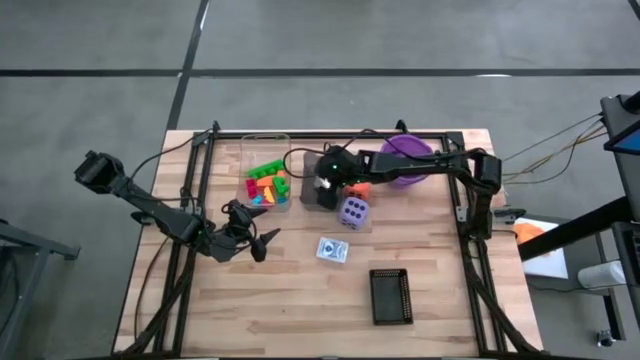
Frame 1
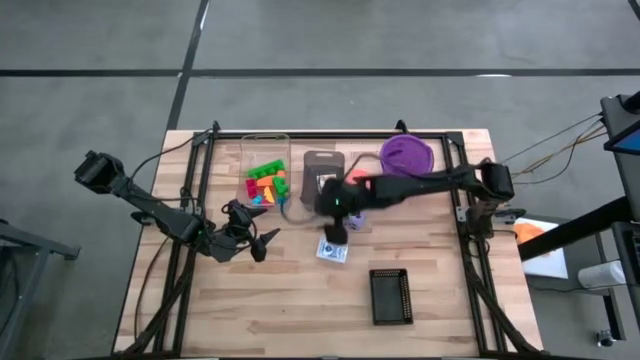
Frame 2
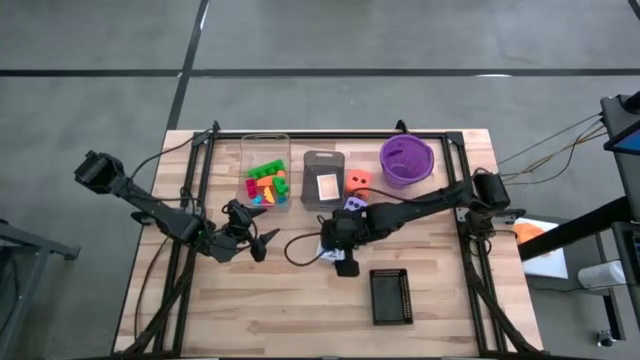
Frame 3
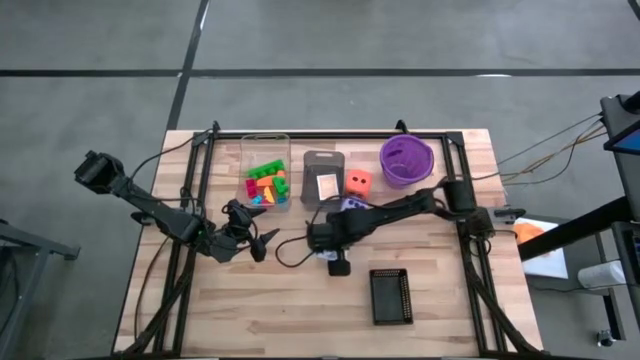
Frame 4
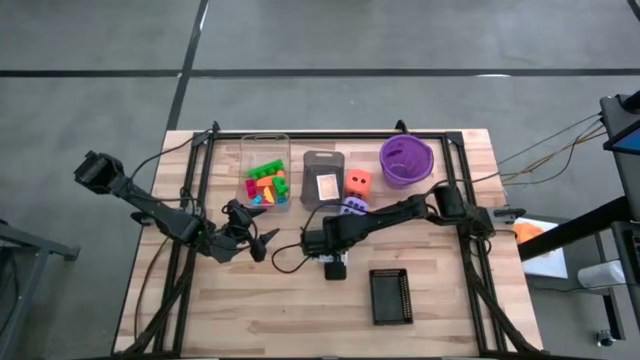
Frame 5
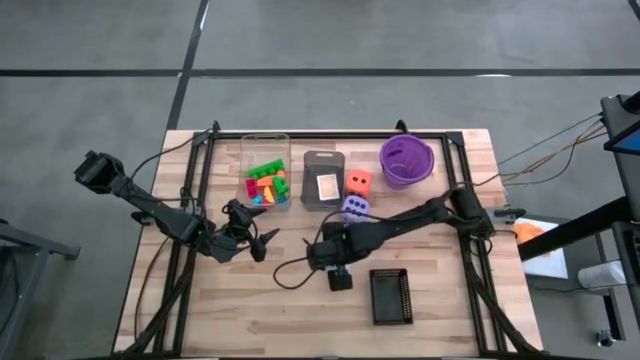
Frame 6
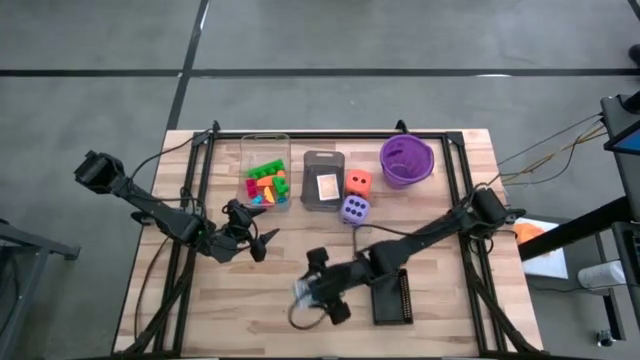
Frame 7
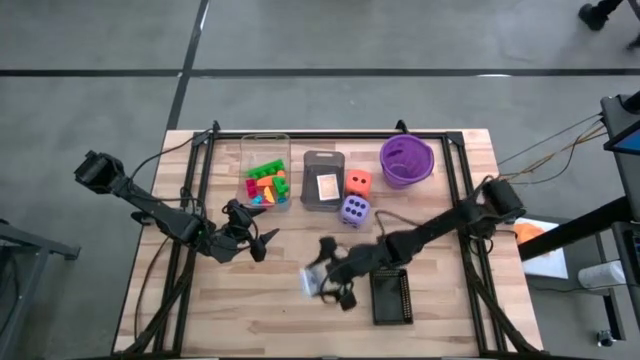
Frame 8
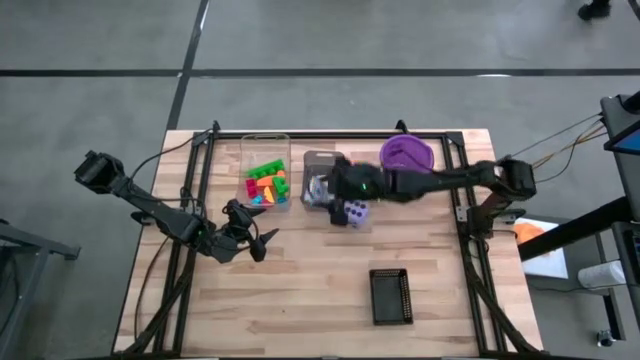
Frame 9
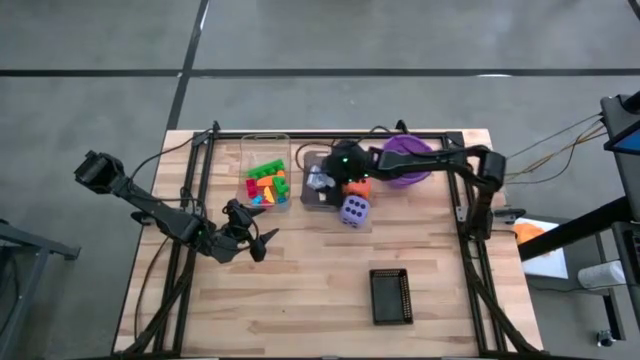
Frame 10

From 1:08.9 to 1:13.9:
Task: Pick & Place Toys
Put the blue playing card box into the gray bin

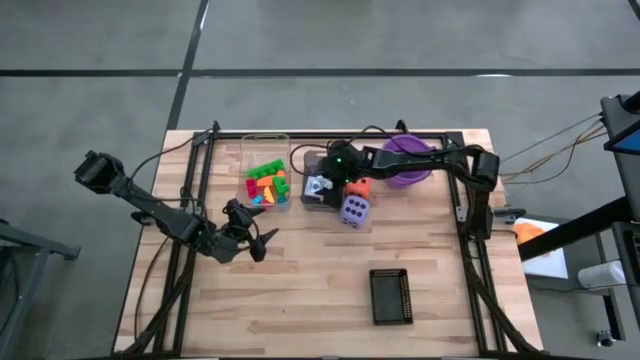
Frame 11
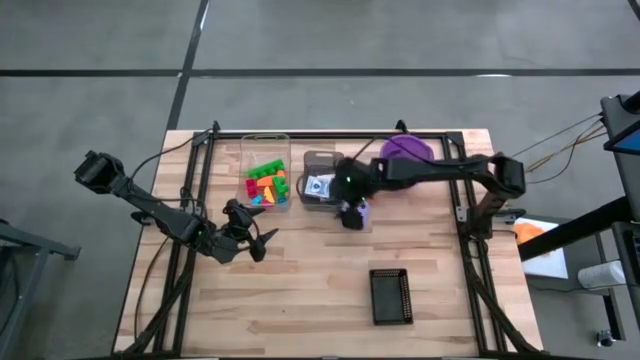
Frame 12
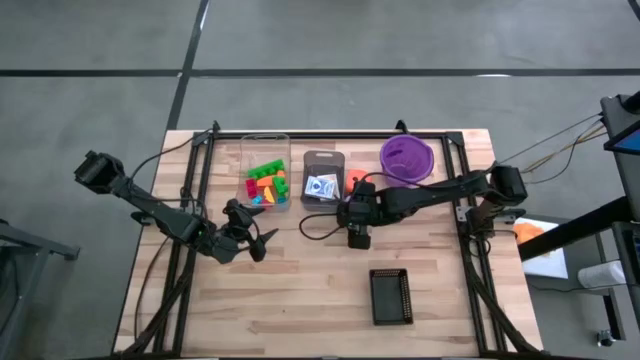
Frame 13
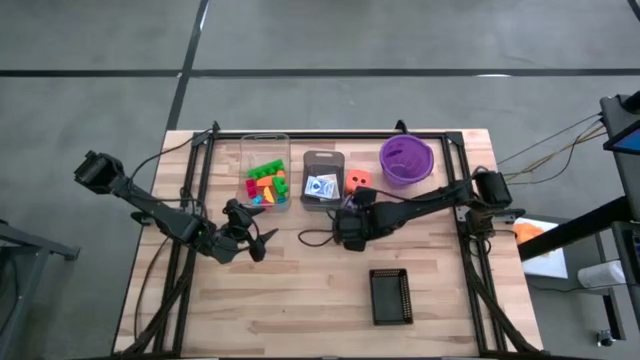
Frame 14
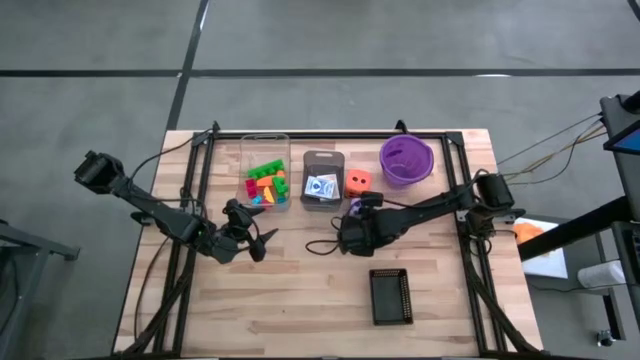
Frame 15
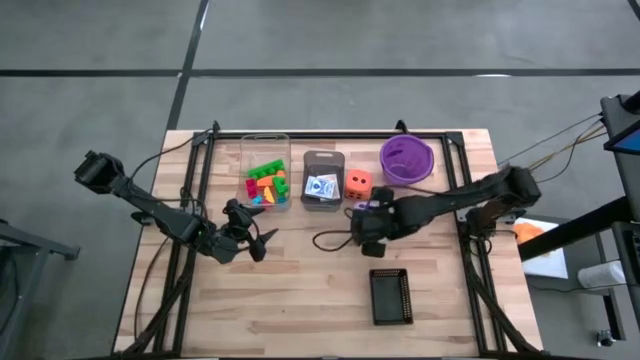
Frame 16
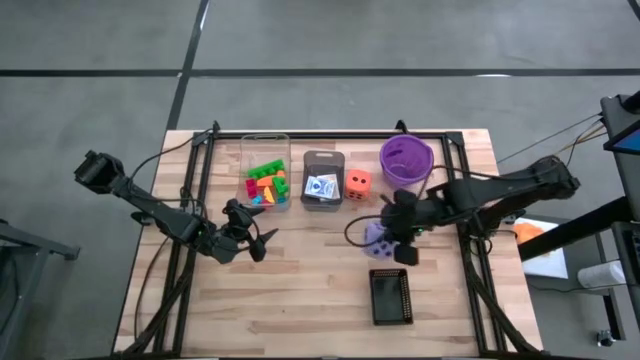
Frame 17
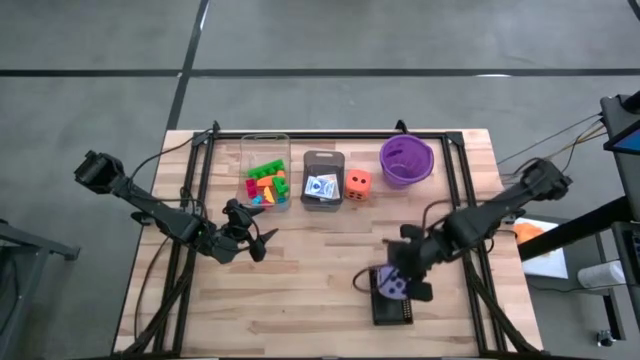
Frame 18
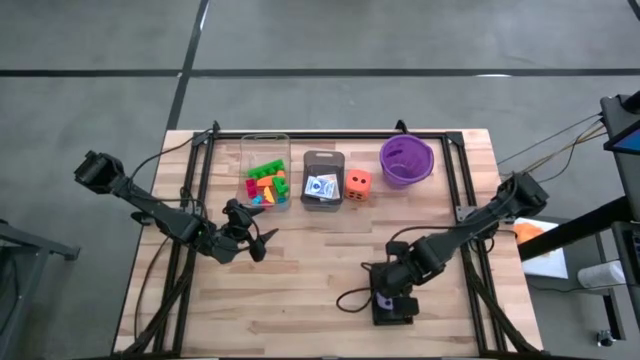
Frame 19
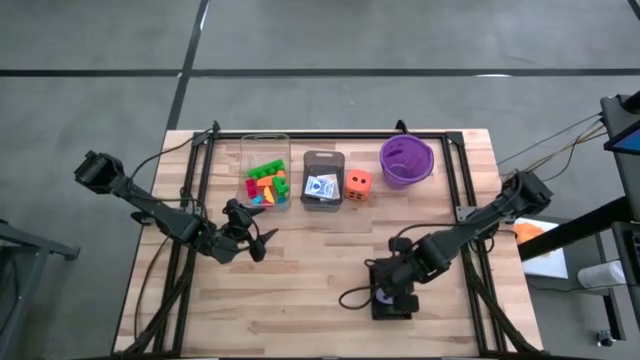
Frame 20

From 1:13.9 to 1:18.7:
Put the violet dice into the black bin

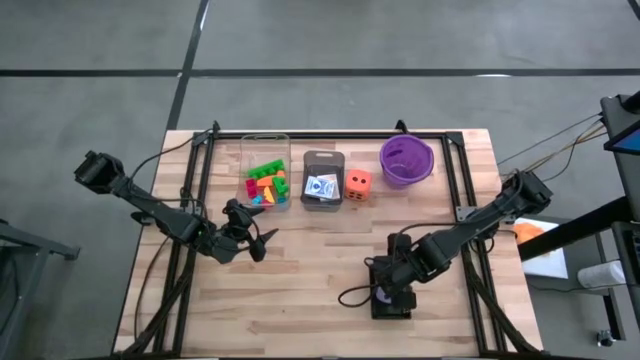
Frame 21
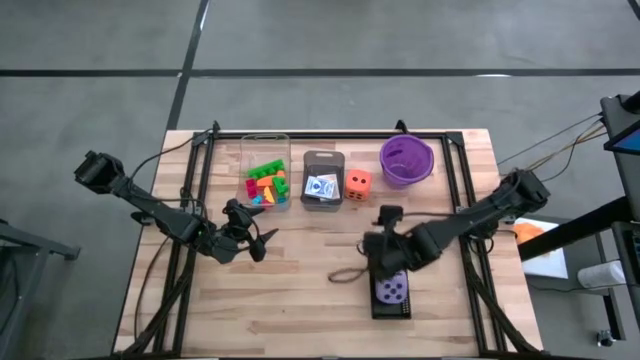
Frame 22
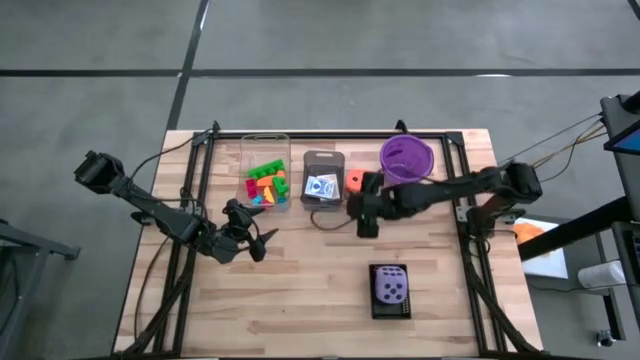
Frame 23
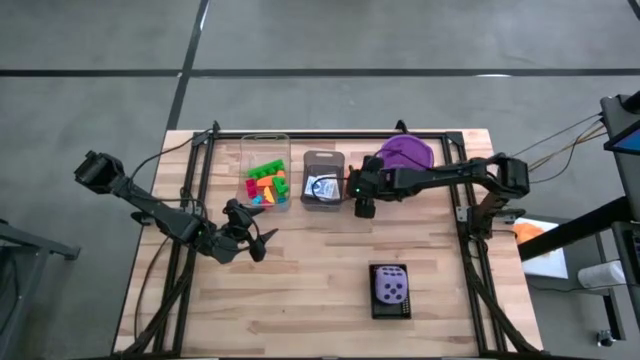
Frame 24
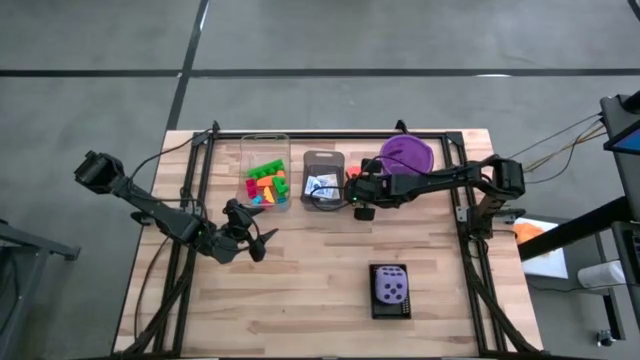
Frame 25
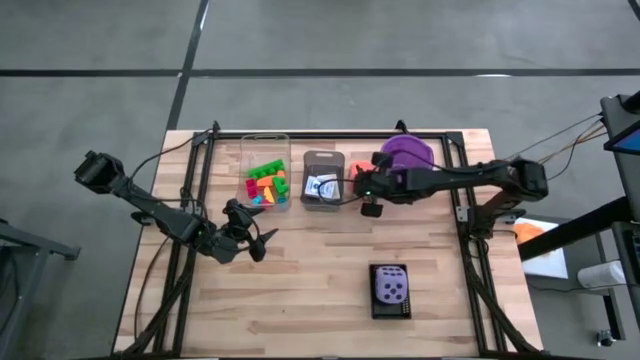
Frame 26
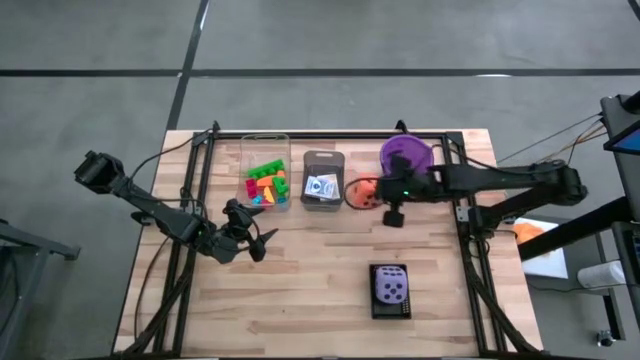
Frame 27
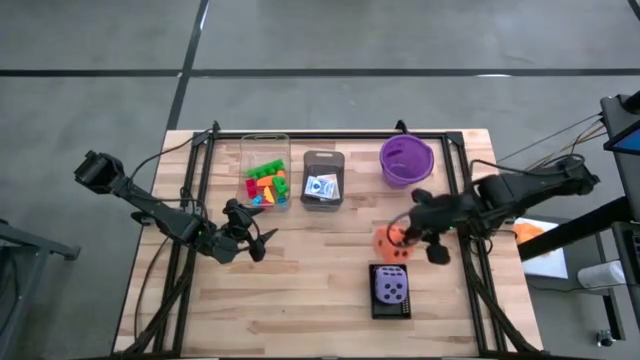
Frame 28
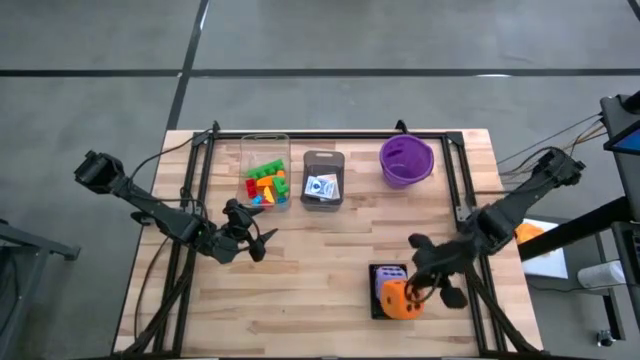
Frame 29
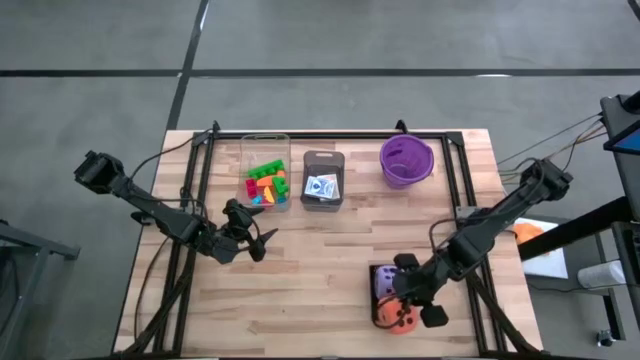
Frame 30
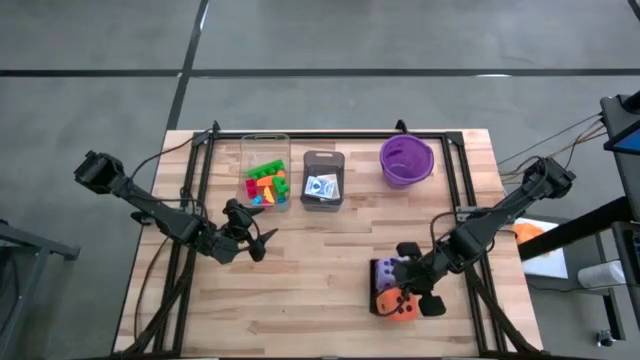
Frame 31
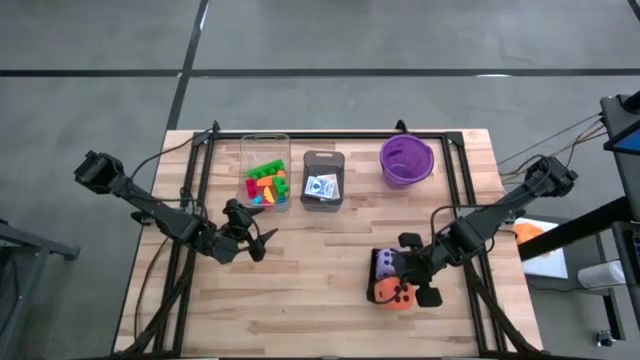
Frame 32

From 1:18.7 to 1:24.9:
Put the orange dice into the black bin

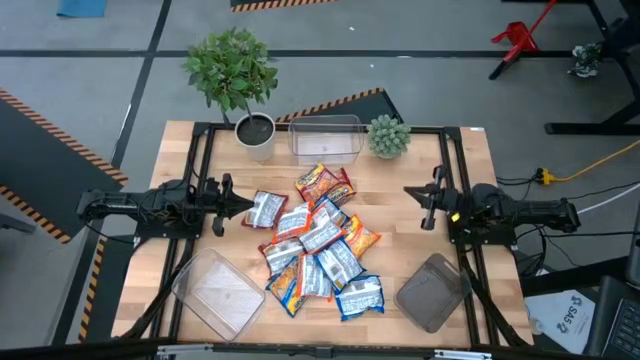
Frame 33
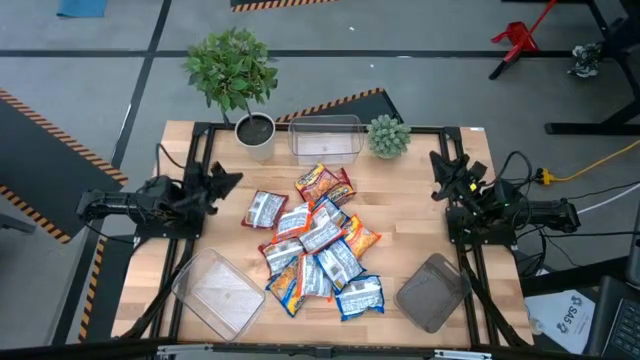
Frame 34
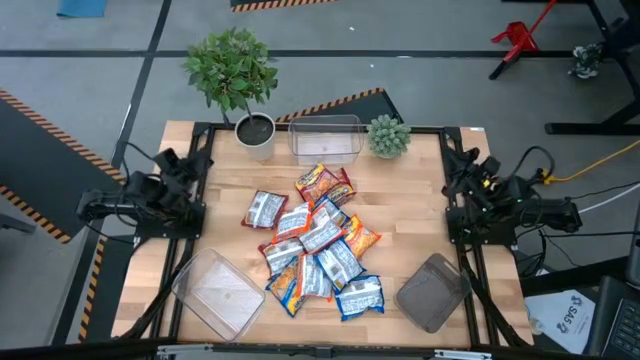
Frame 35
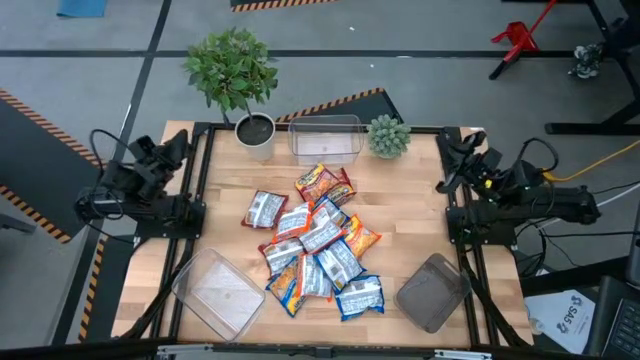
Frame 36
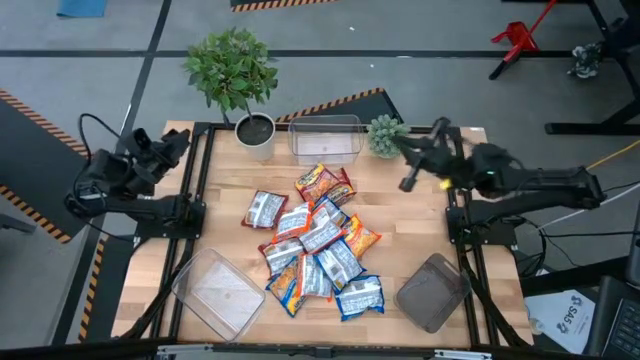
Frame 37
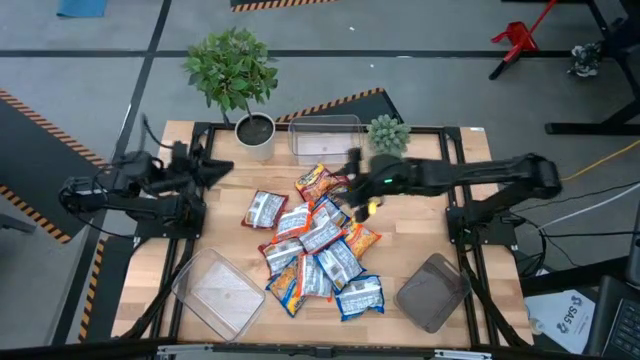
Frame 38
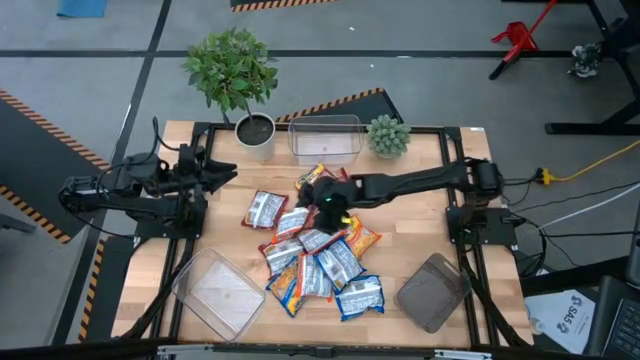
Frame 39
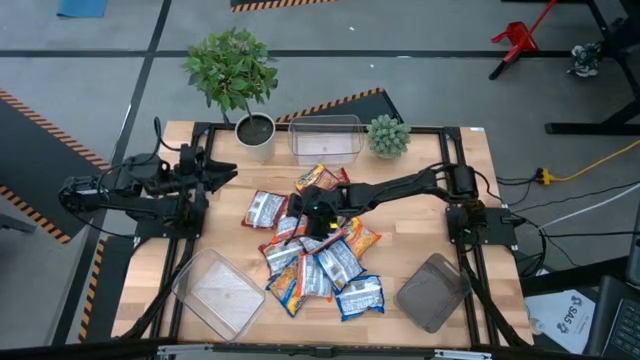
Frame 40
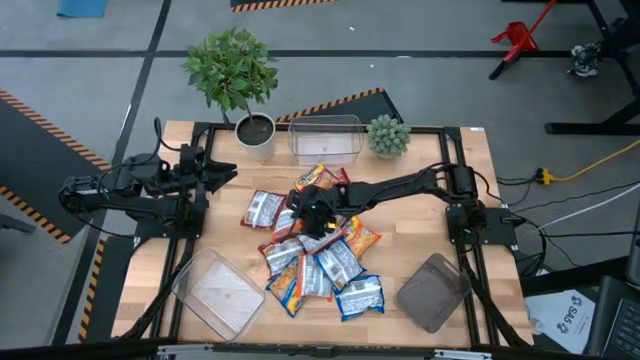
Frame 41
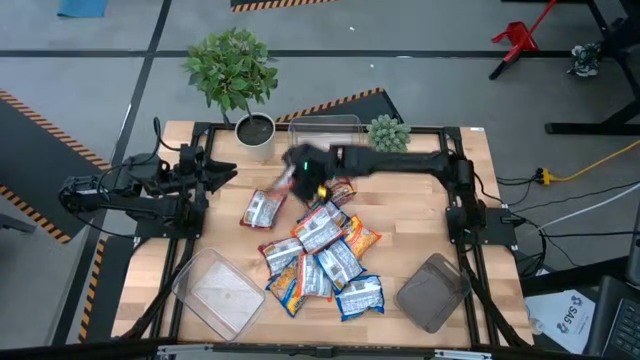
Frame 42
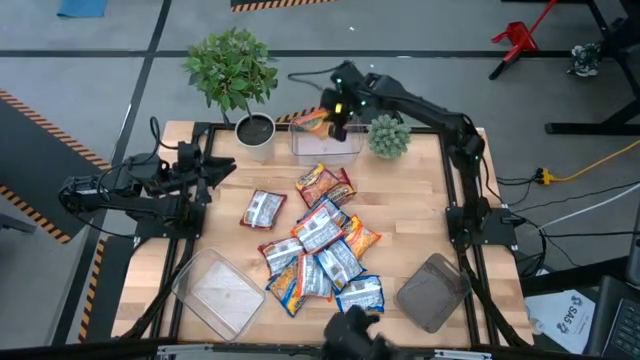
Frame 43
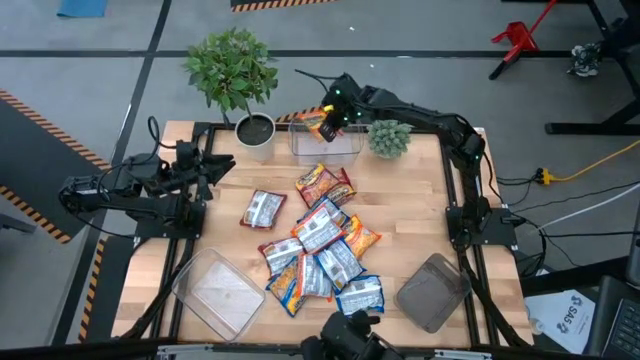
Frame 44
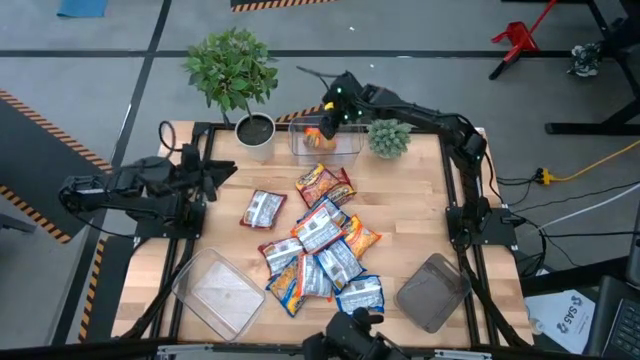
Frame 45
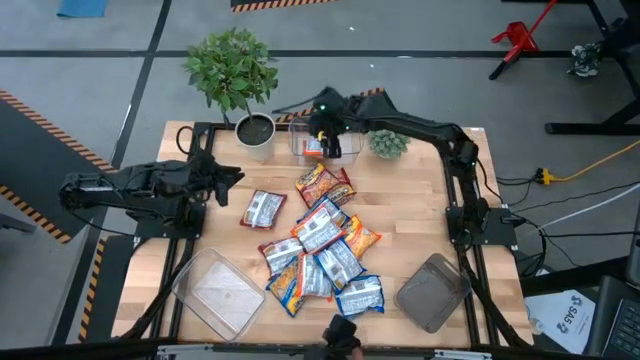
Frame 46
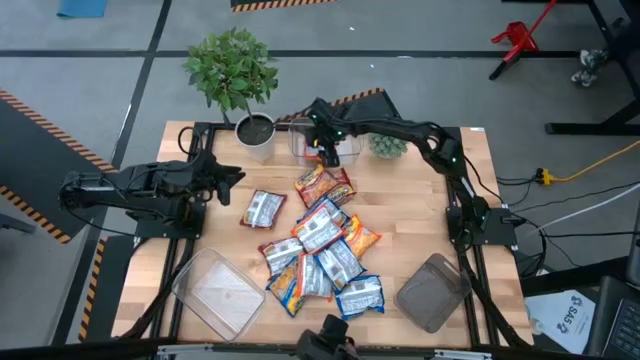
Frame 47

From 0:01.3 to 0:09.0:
Task: Sort Maruchan noodles
Put the orange noodle pack into the top transparent bin
